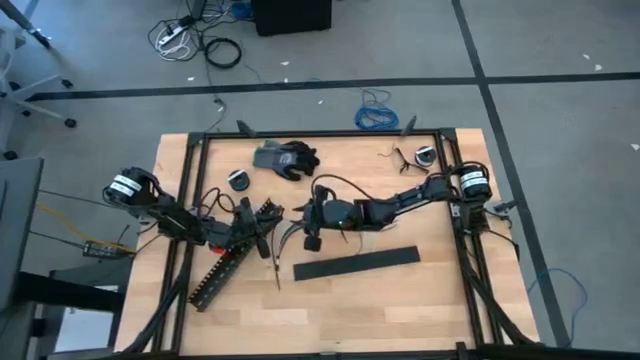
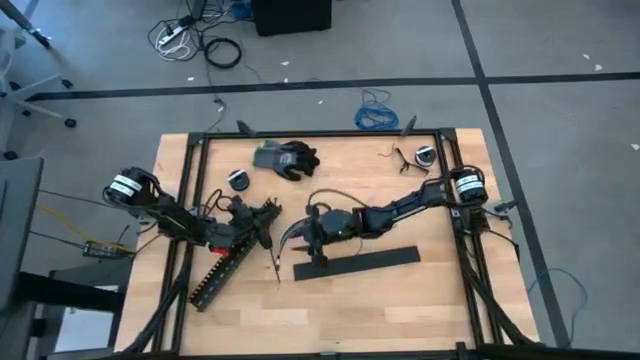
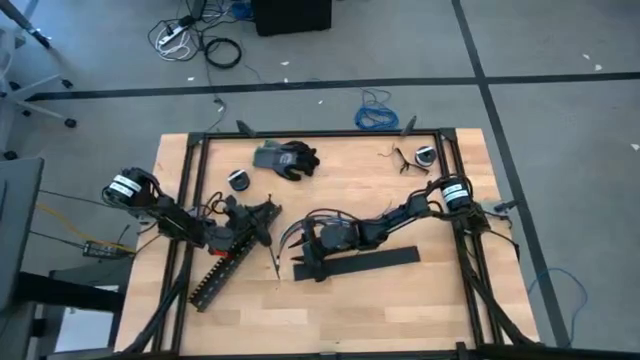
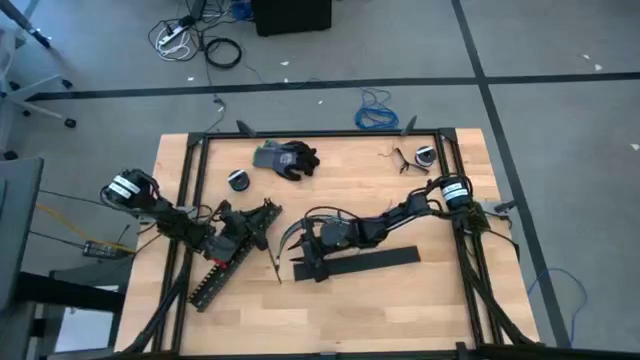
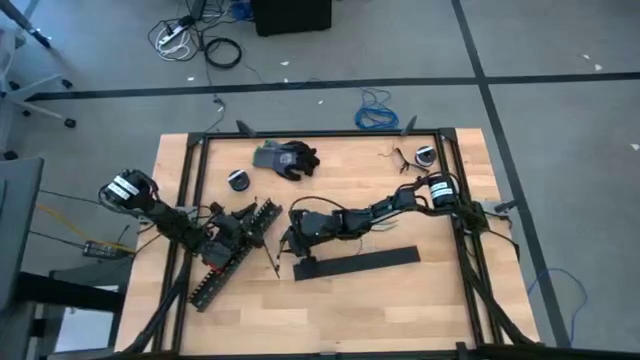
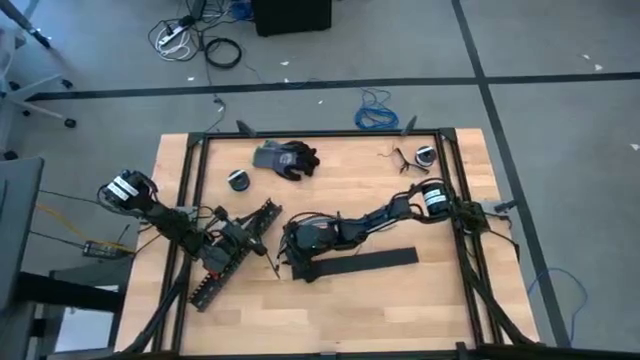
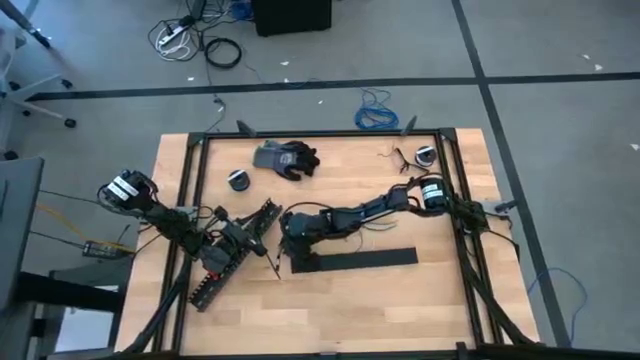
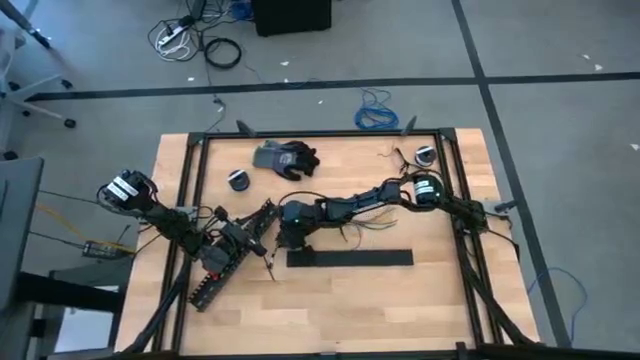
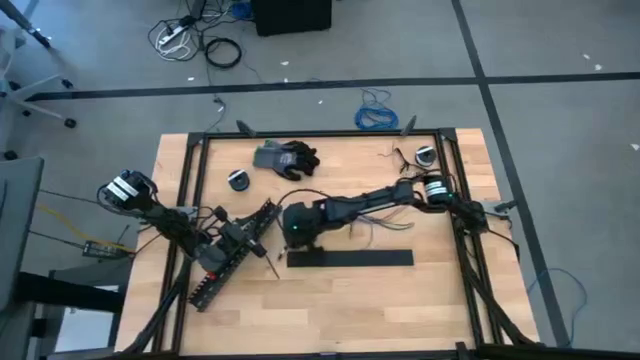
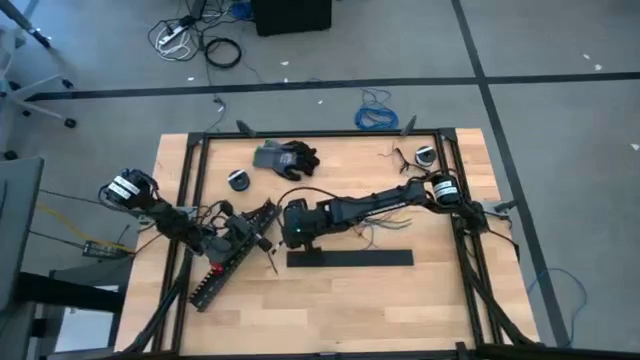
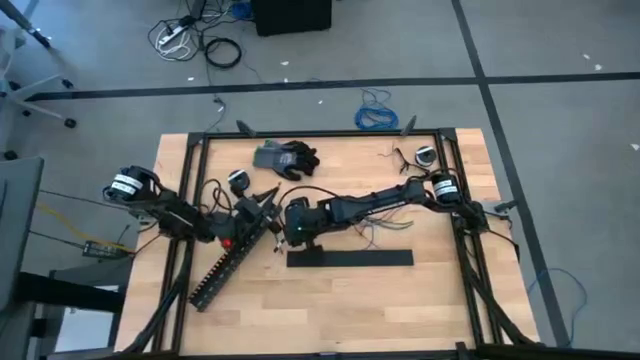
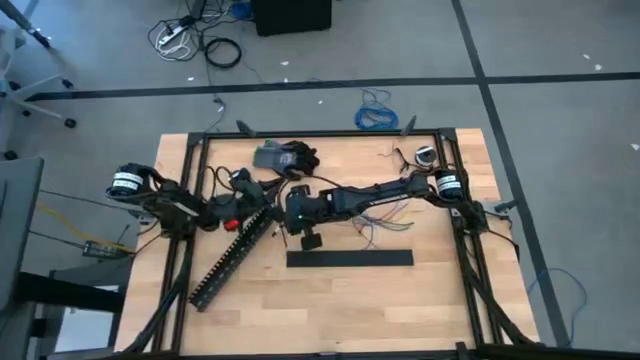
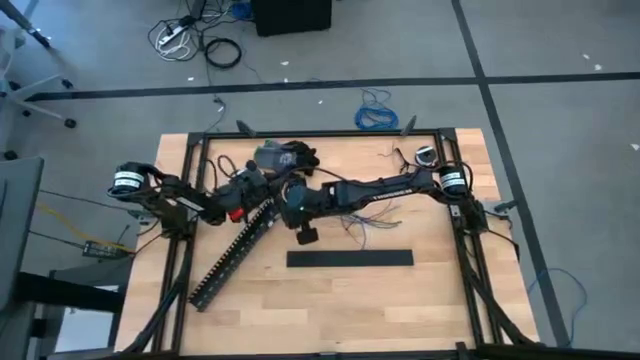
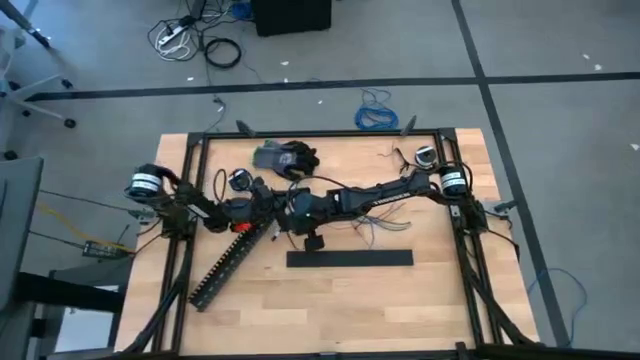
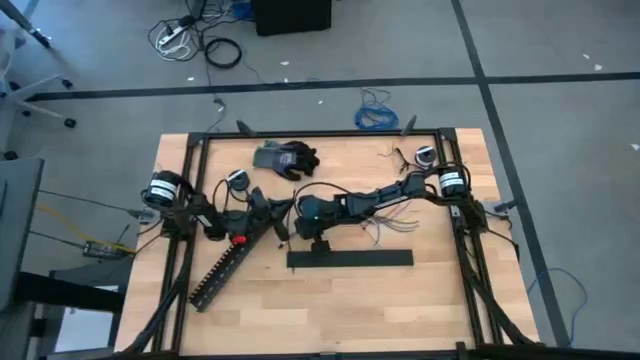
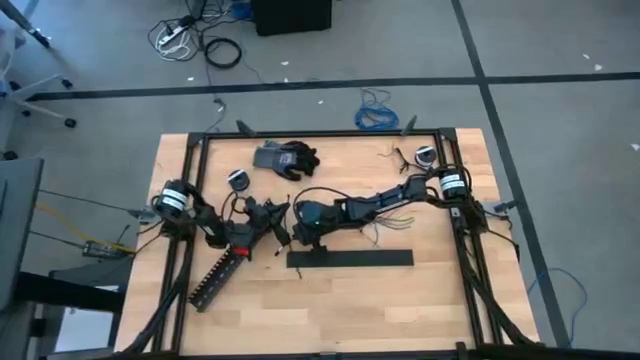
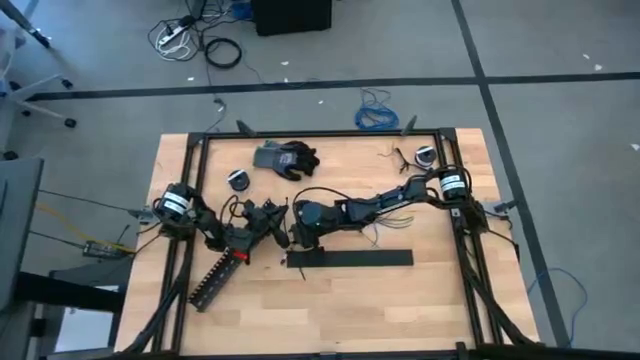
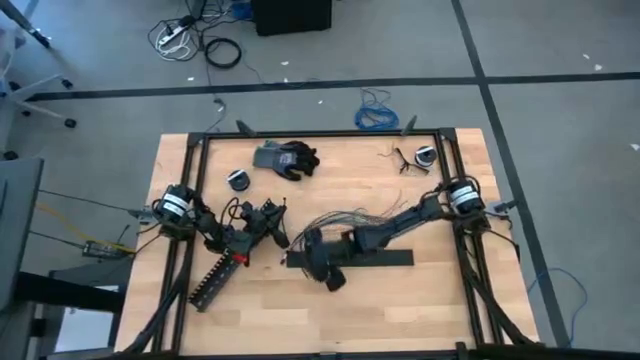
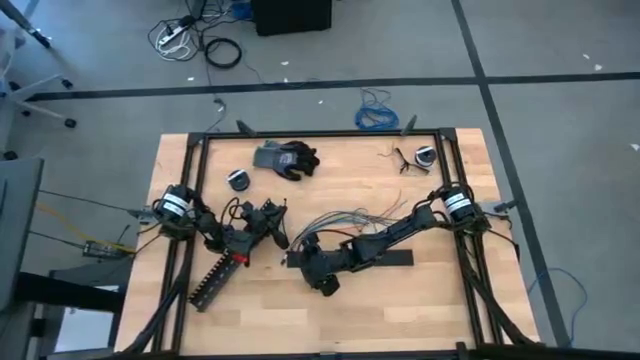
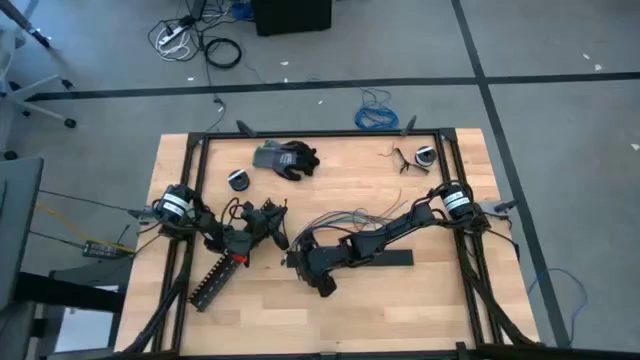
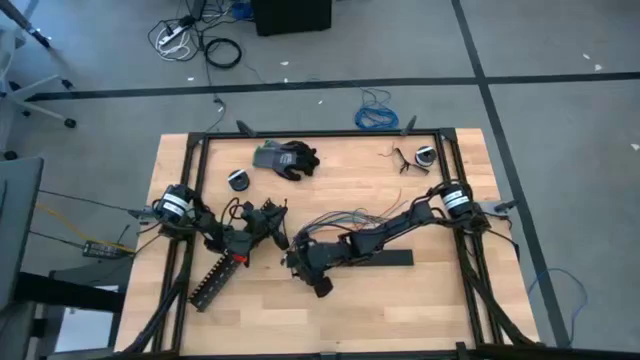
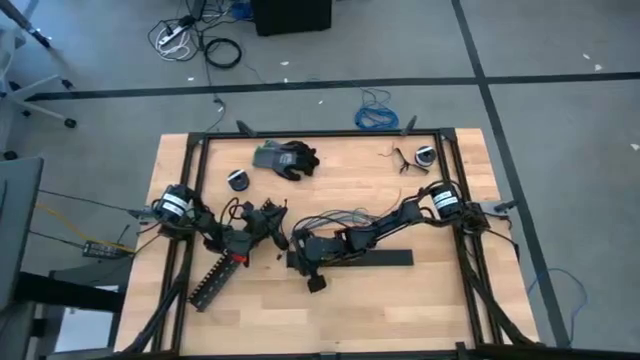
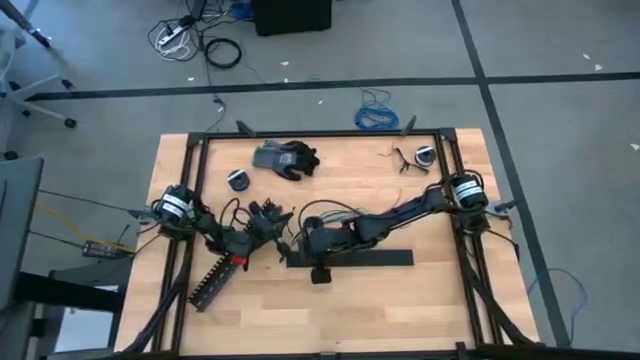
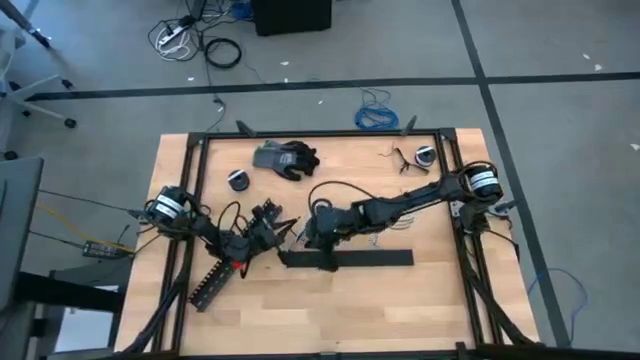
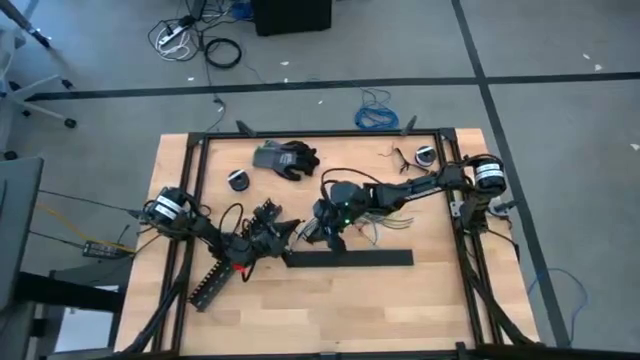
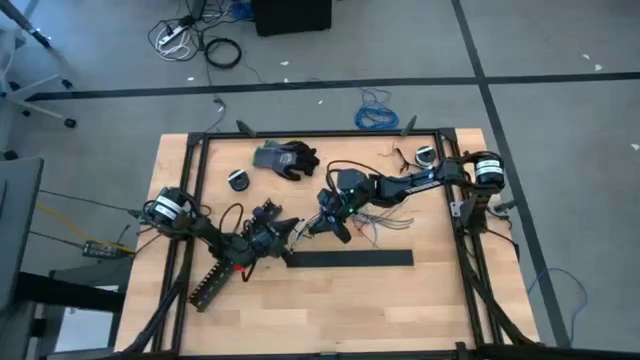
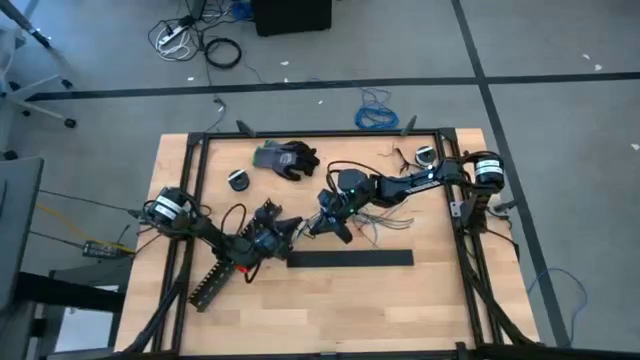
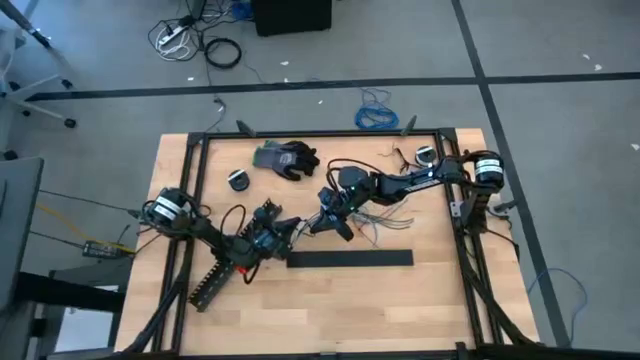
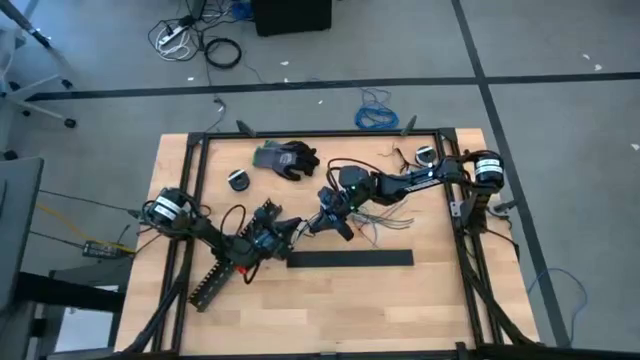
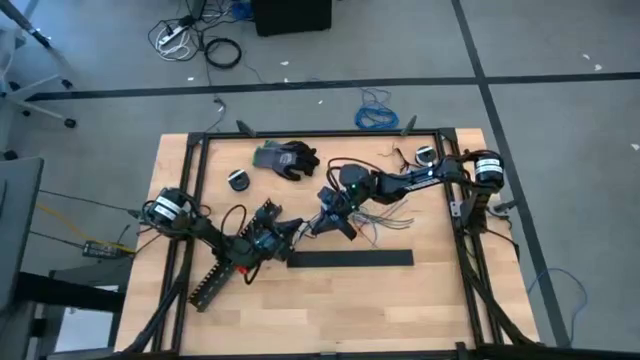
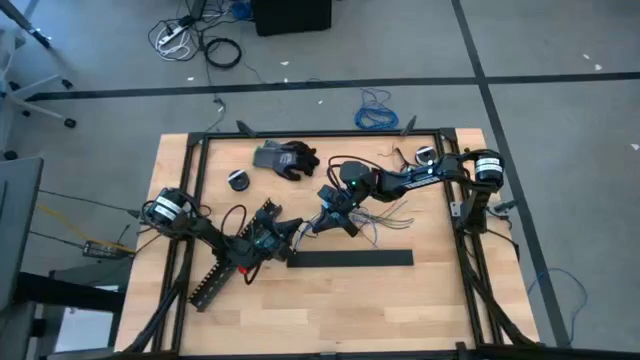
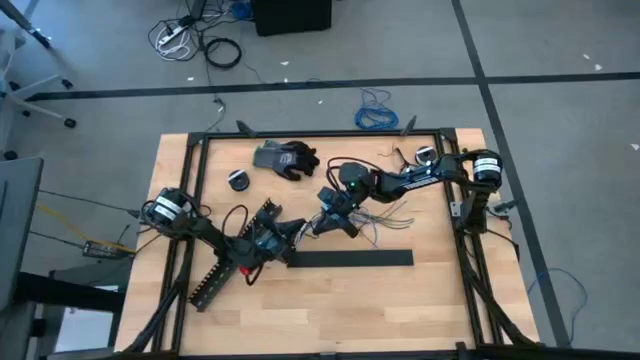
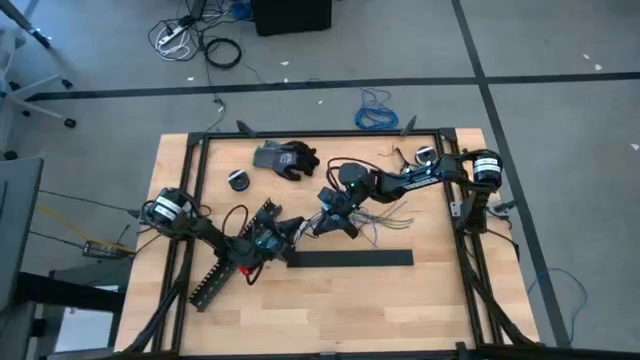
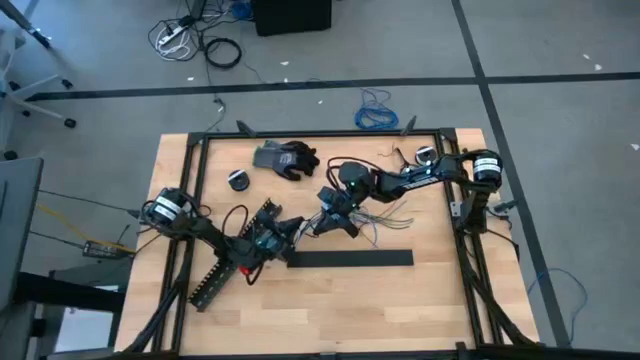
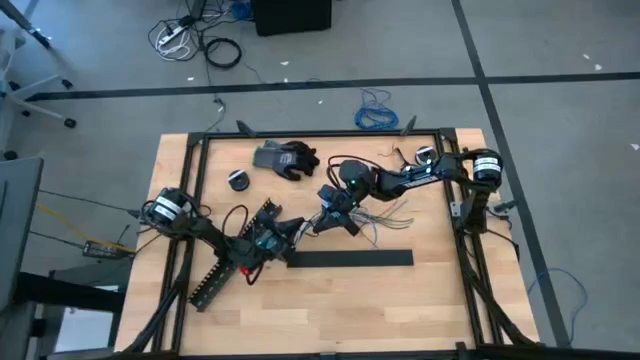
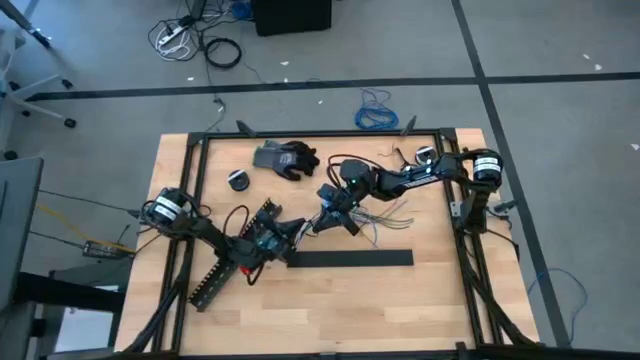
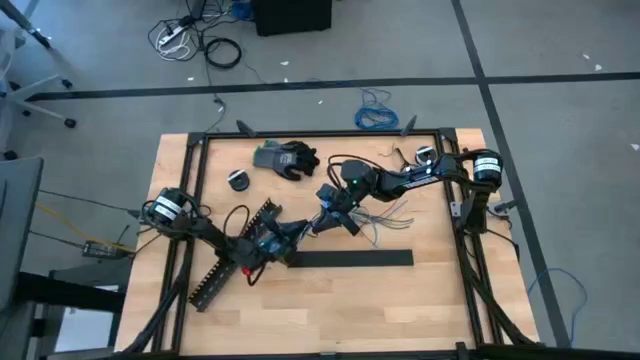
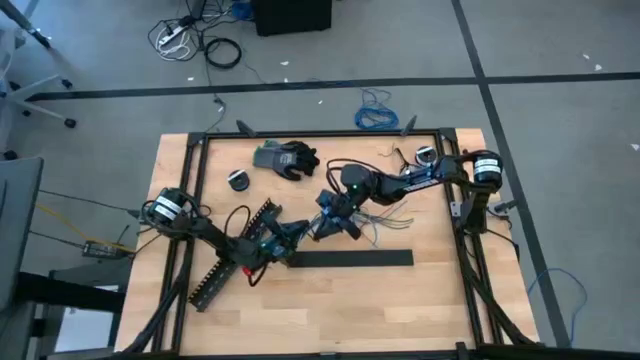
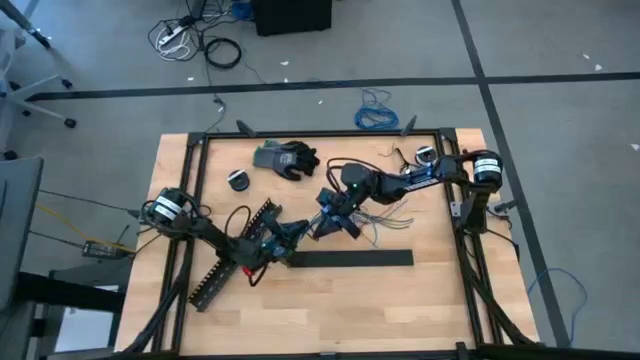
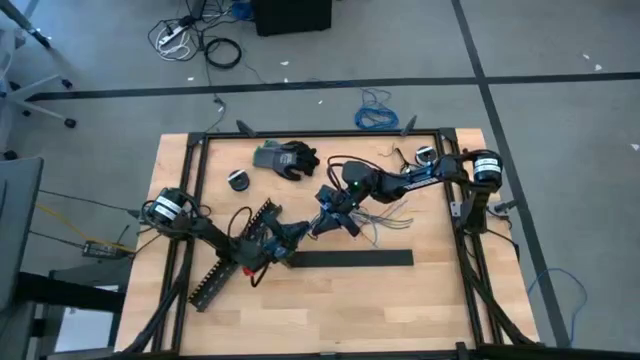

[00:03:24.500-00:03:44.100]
Task: Ziptie cables
Wrap the other black zip tie on the cable wires
